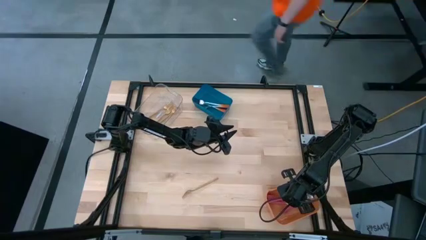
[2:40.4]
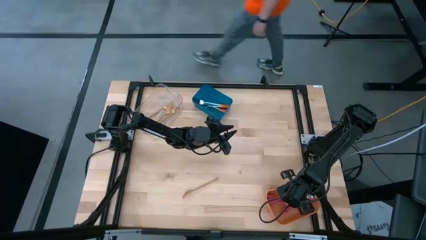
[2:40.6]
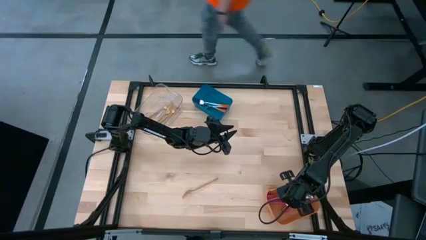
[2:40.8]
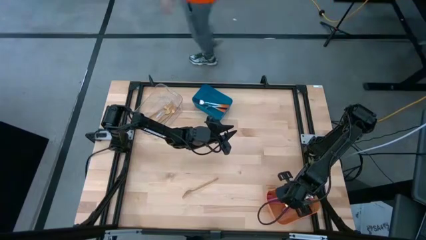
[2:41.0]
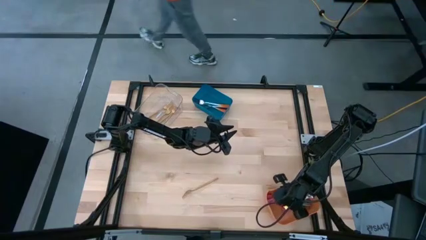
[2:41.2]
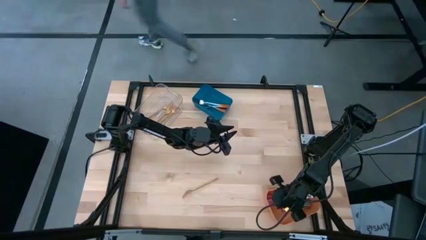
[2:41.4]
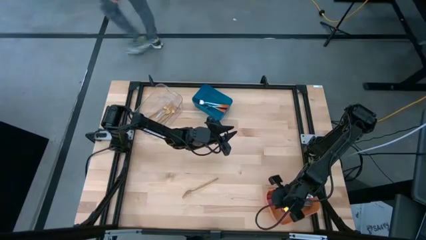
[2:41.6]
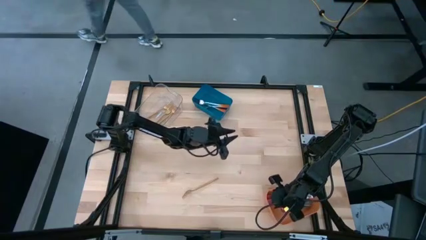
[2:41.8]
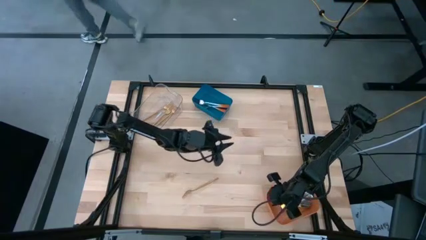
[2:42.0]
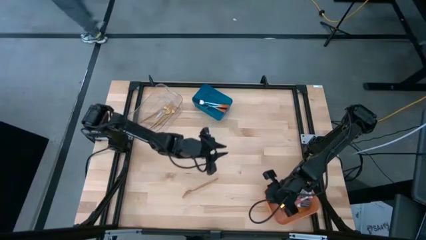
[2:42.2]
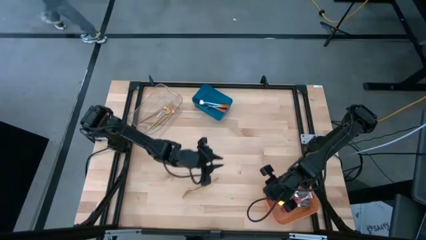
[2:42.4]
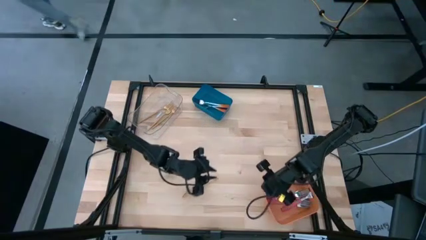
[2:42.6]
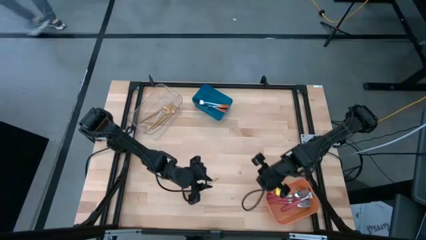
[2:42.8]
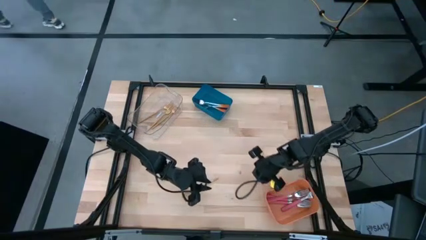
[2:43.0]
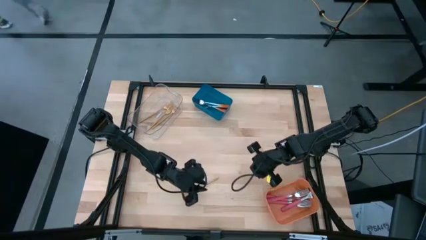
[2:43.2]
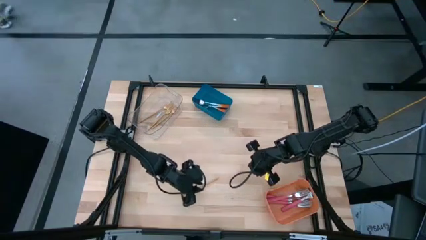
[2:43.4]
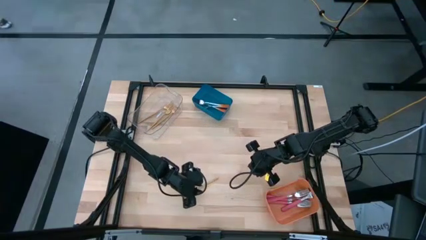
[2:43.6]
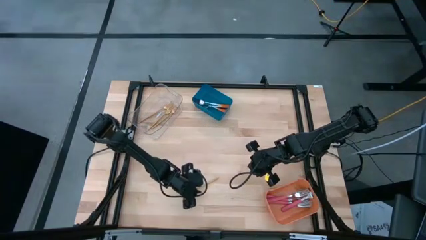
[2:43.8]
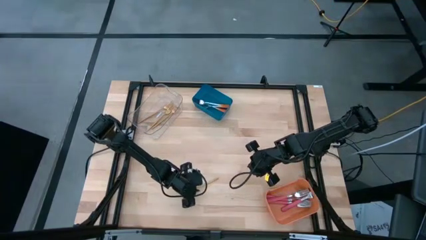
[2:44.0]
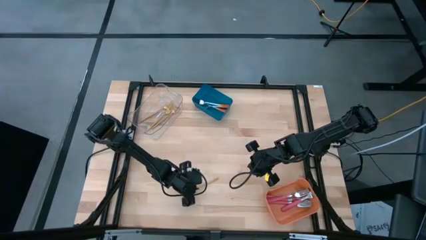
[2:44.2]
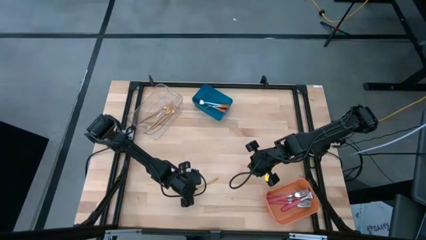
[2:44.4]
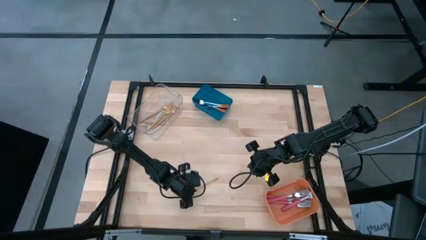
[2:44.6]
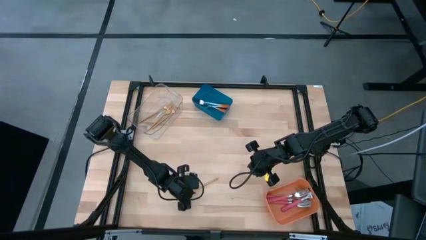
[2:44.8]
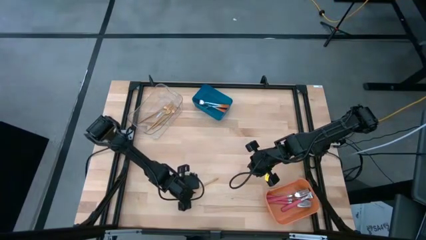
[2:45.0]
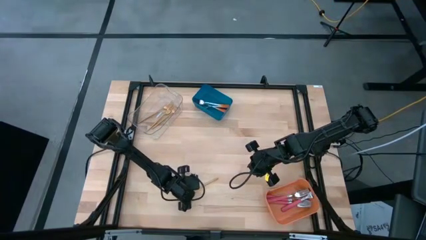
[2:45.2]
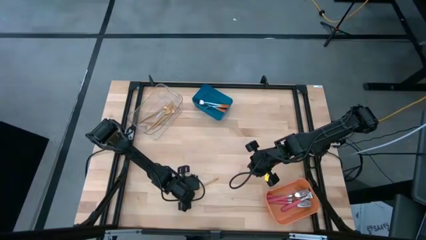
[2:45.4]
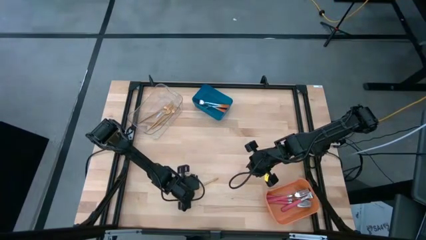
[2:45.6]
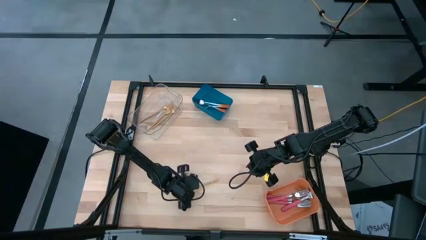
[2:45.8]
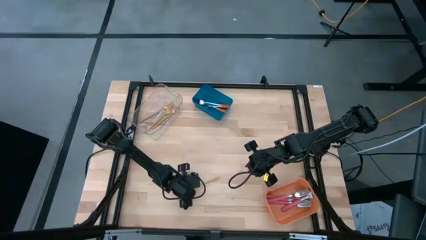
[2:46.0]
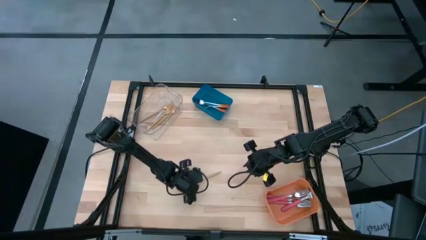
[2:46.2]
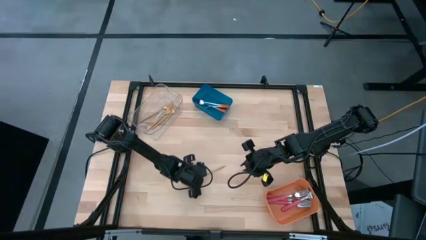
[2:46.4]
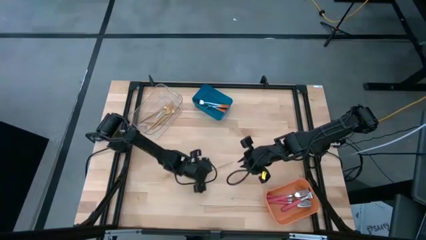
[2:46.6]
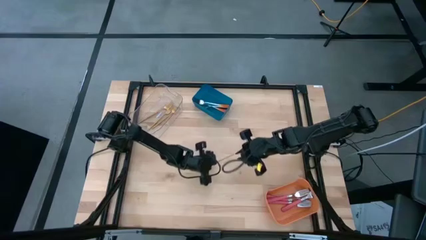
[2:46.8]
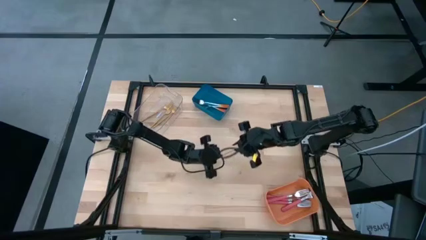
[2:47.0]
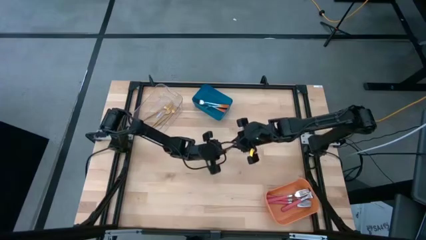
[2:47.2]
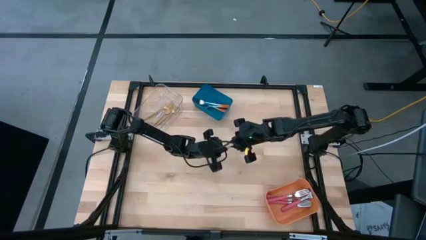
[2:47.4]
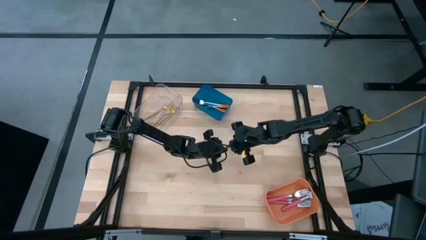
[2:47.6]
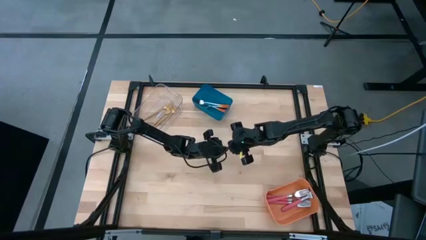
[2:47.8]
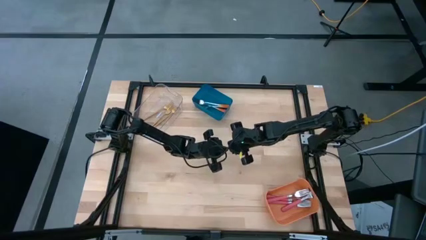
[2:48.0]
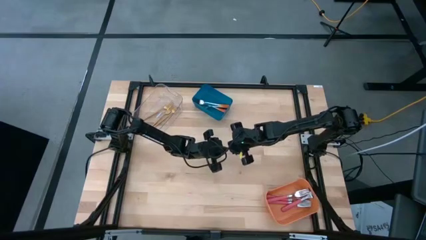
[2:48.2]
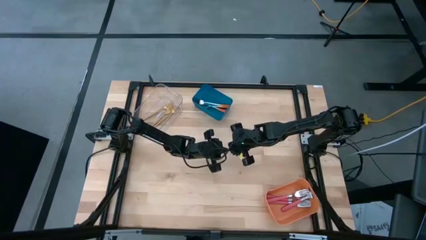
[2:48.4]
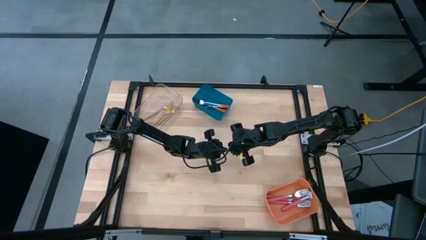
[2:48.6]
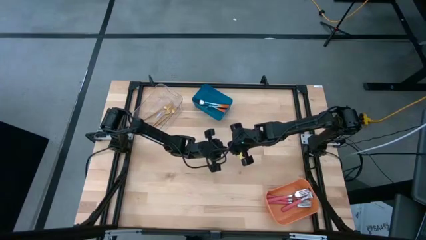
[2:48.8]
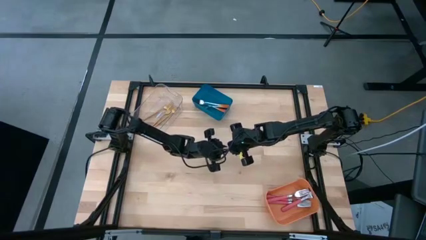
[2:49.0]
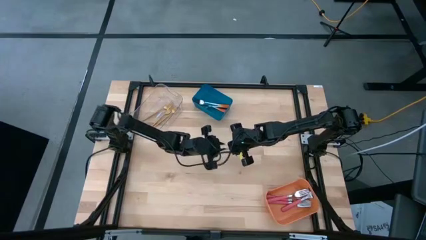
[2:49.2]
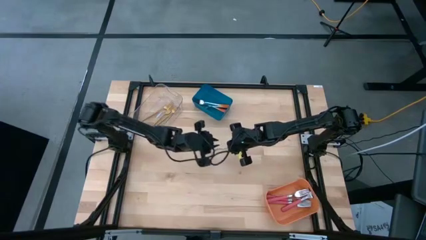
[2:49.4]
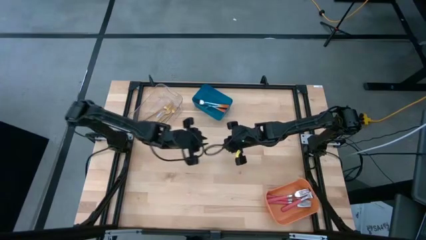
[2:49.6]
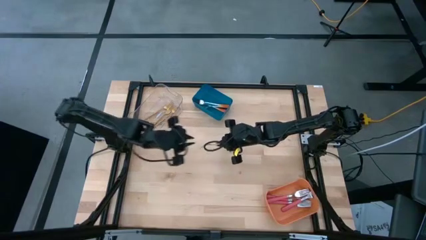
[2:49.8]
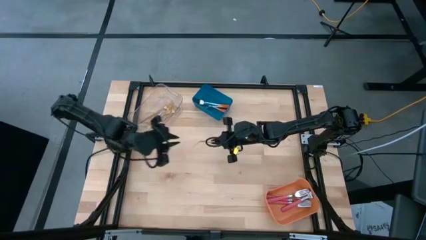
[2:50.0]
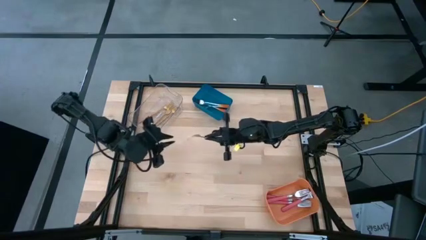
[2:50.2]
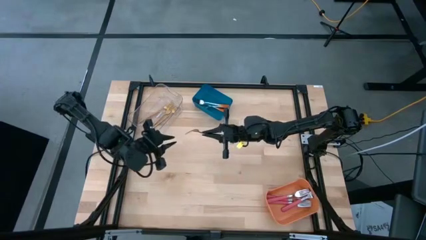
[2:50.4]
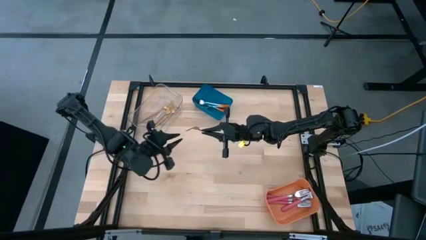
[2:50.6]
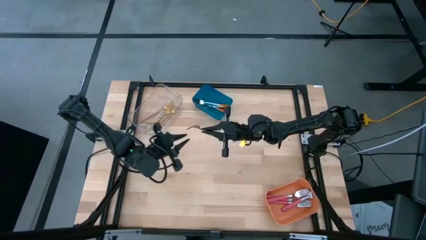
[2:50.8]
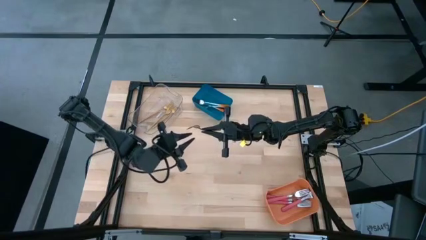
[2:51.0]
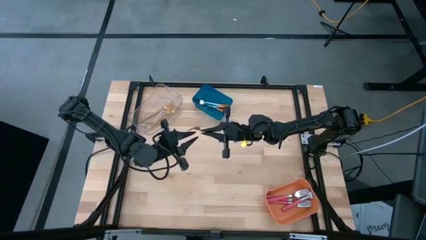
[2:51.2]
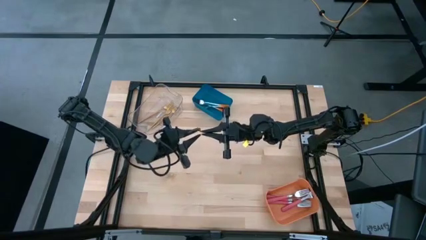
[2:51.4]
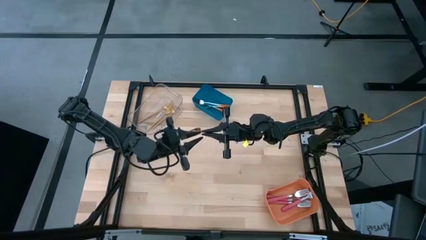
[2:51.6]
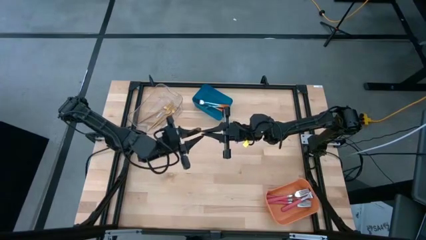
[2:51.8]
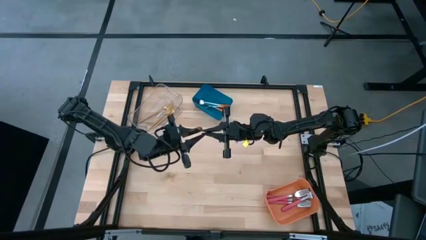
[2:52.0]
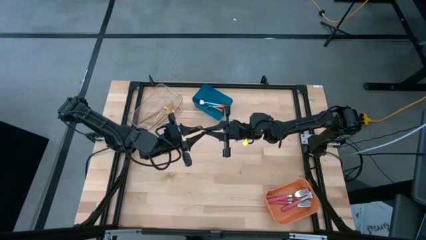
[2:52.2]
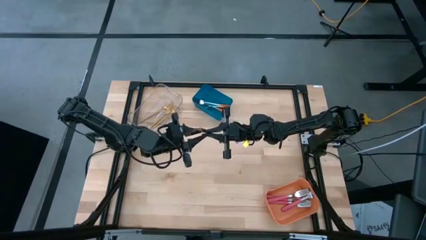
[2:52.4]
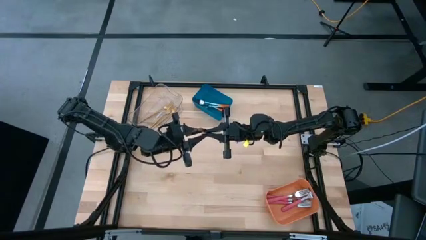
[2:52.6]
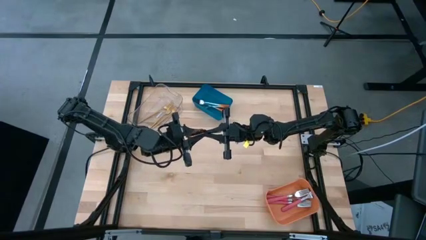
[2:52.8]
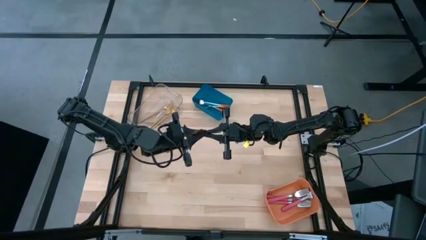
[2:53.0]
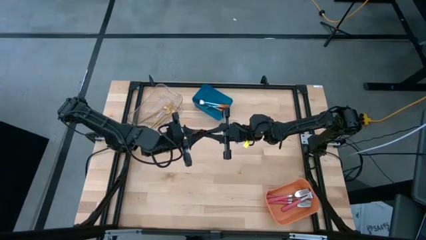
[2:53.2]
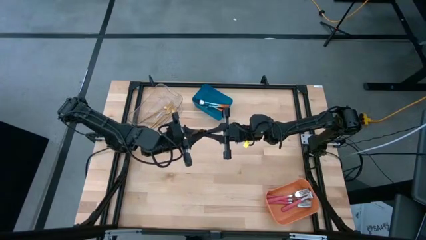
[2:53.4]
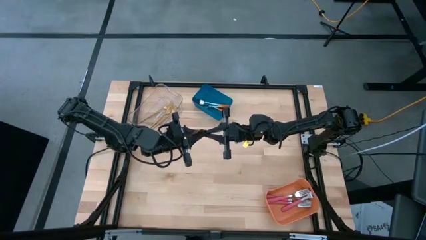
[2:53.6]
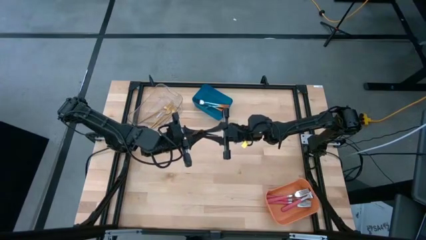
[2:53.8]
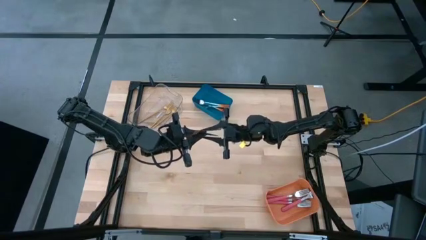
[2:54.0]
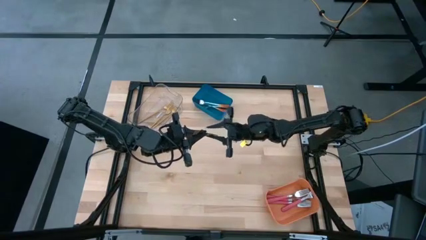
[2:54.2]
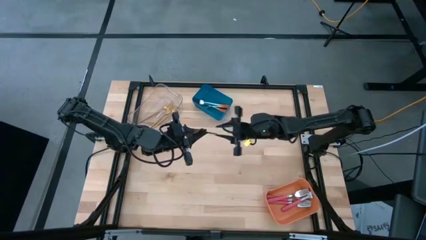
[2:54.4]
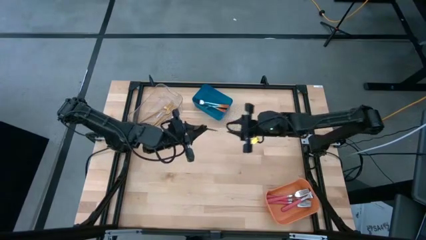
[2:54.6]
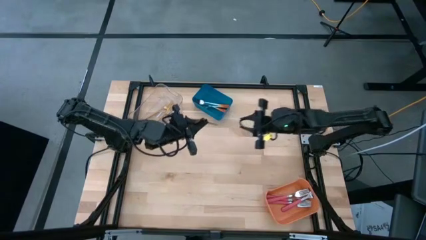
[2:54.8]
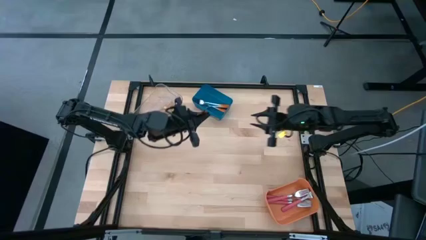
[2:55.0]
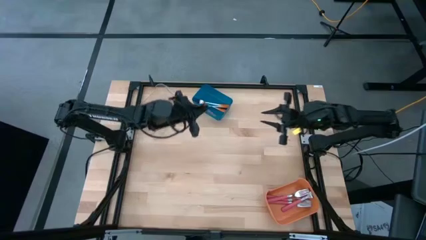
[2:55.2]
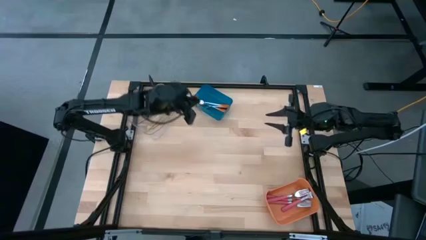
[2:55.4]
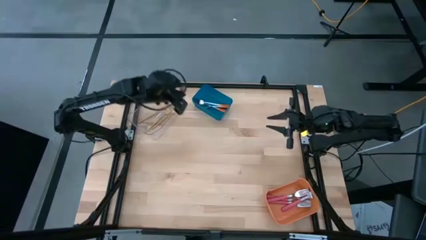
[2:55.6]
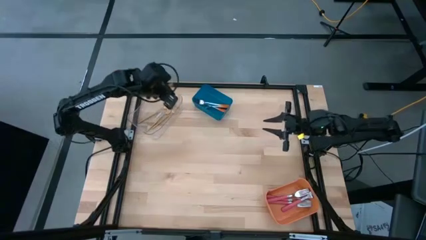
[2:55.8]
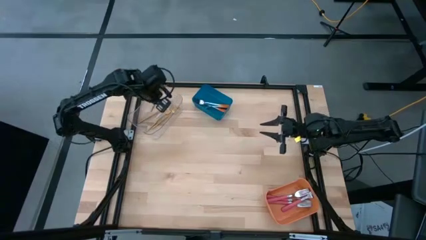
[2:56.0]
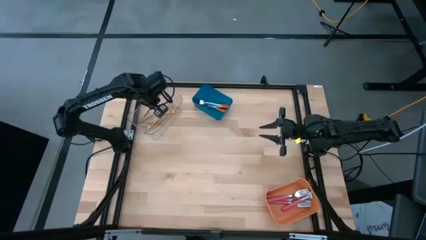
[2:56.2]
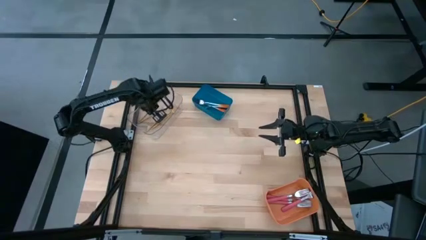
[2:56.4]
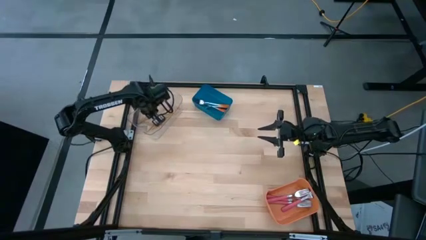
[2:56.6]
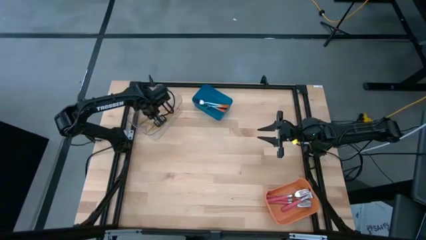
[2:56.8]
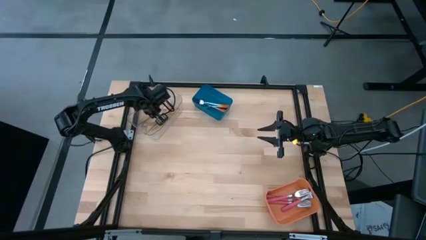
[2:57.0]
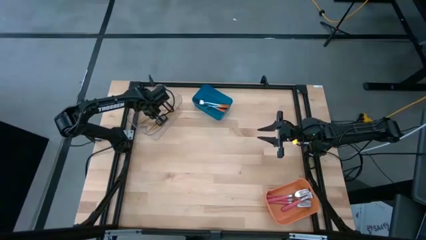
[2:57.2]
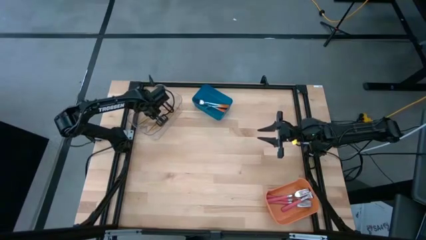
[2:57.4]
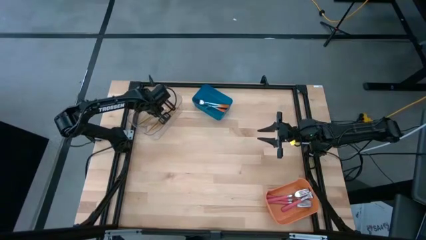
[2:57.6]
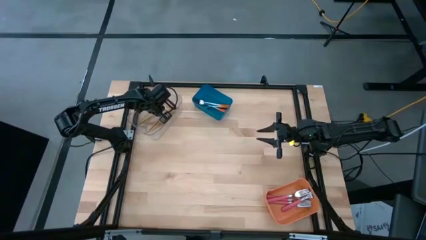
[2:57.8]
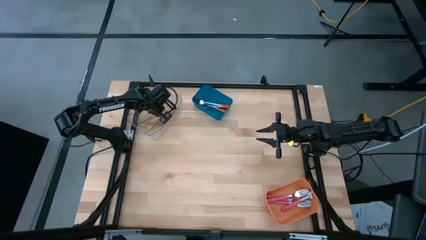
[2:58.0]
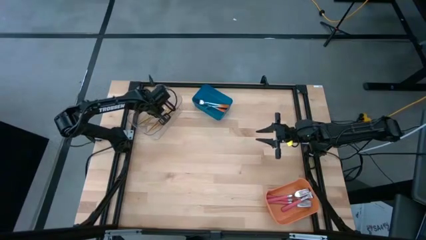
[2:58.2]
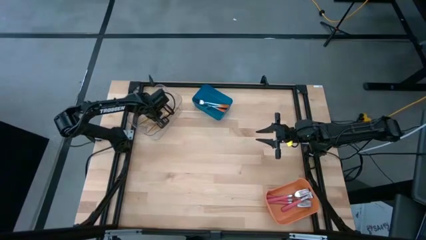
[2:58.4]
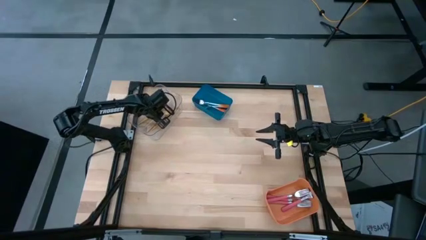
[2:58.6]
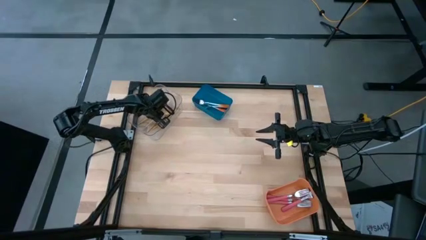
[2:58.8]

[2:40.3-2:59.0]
Task: Sort silverware by color (type)
Put the gold fork into the transparent bin
